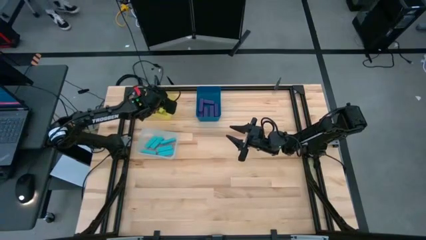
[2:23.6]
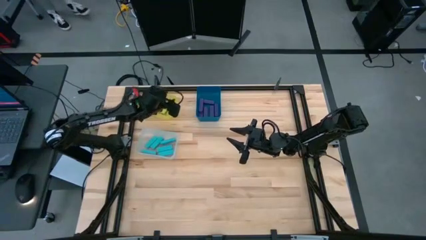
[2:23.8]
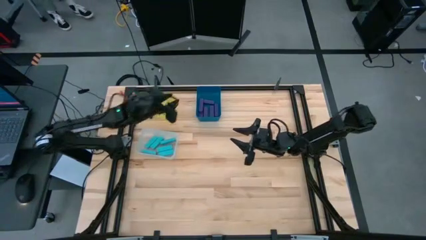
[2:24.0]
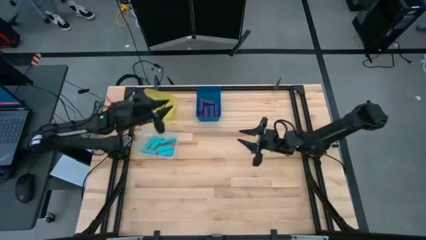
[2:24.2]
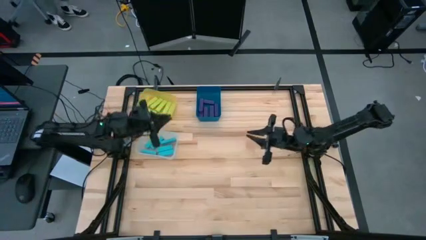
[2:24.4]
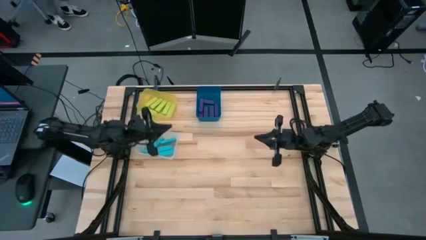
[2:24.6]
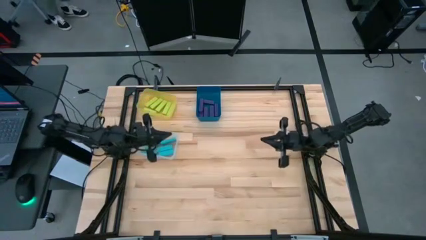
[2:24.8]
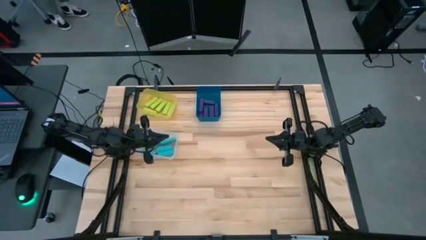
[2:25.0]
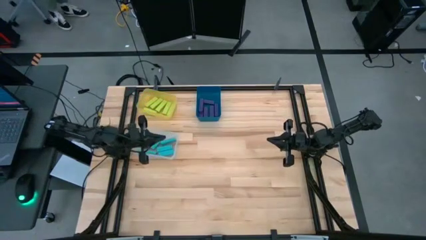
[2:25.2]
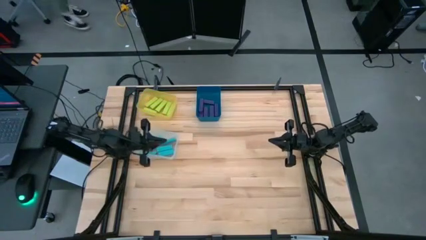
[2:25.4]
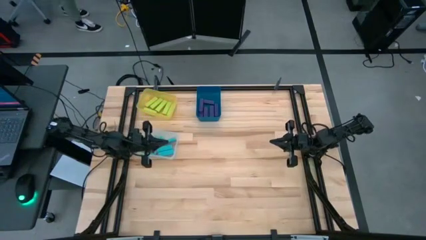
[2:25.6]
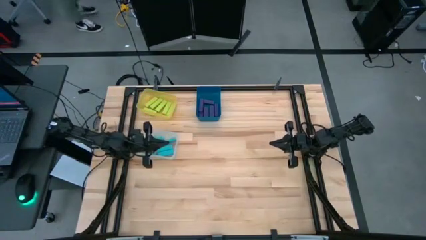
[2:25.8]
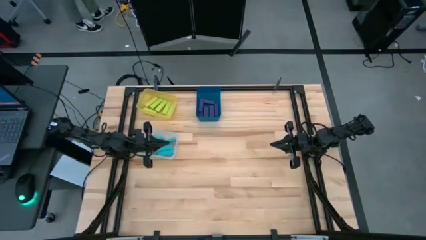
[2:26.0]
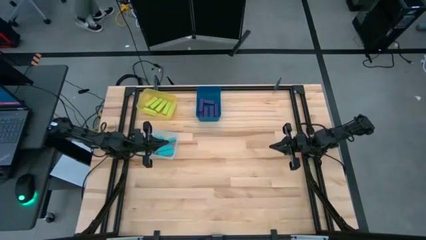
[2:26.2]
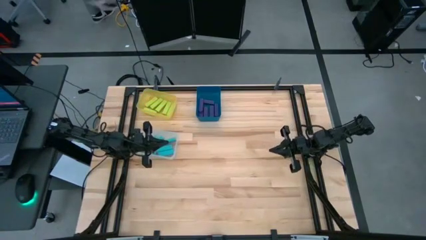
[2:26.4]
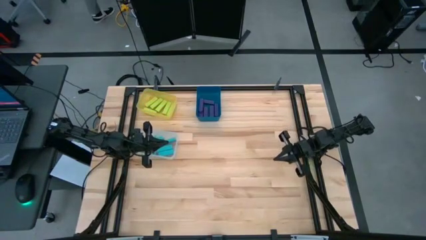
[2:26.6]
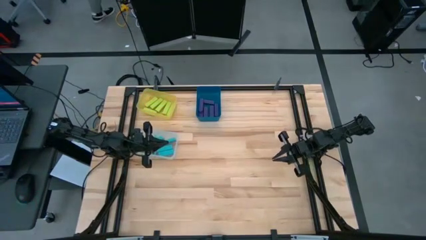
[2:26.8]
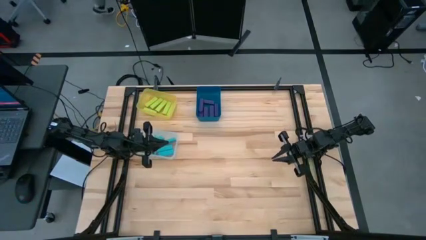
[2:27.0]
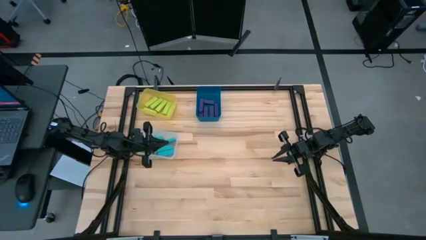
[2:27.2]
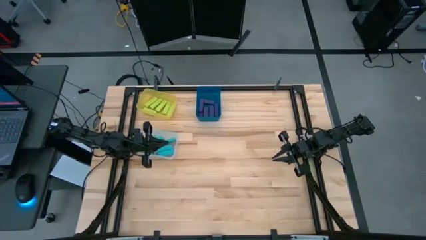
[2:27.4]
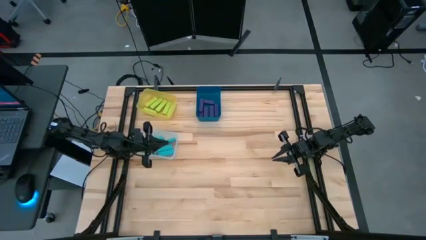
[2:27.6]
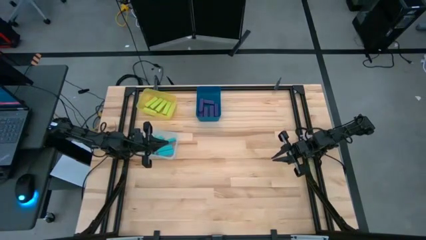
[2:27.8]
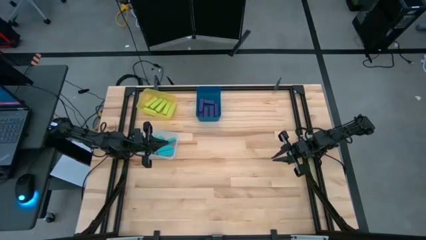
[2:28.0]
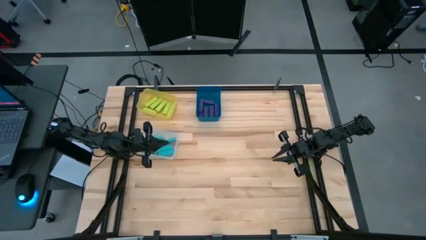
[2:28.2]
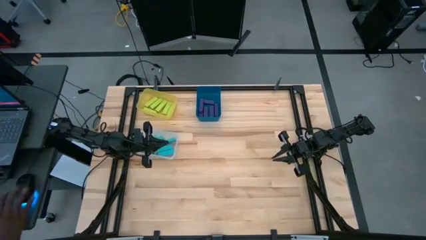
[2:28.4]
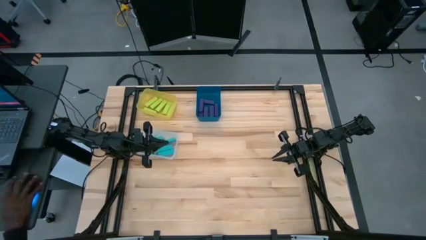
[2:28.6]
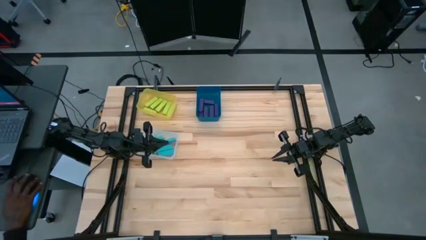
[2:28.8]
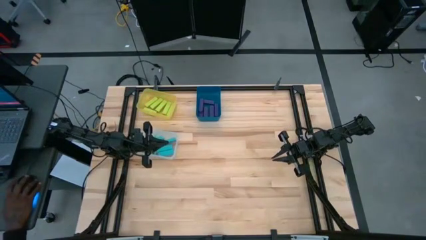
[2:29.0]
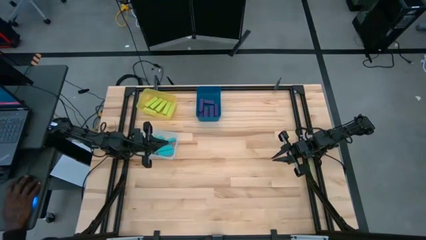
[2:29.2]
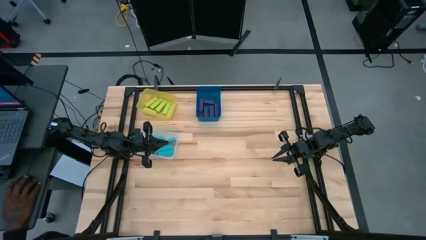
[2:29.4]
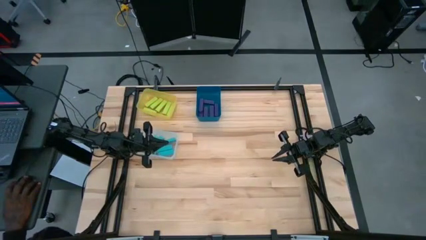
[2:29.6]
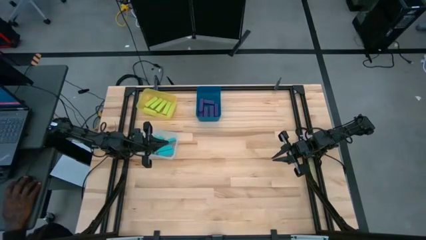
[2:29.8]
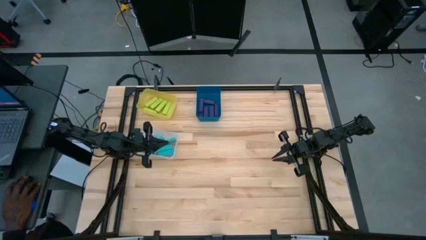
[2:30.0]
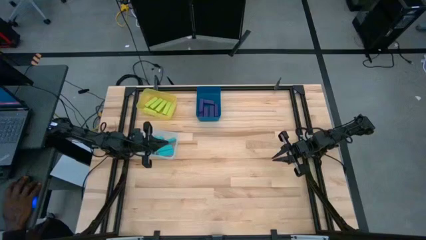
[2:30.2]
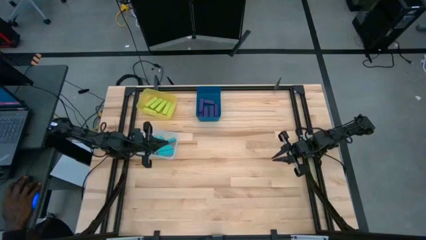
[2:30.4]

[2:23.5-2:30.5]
Task: Sort blocks
Return to Home Position

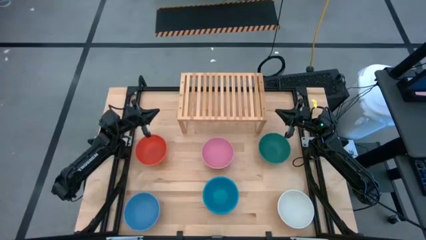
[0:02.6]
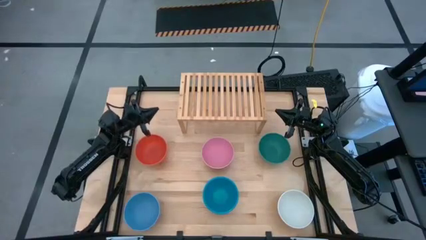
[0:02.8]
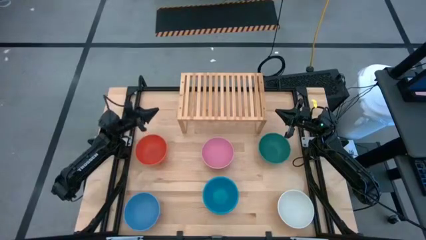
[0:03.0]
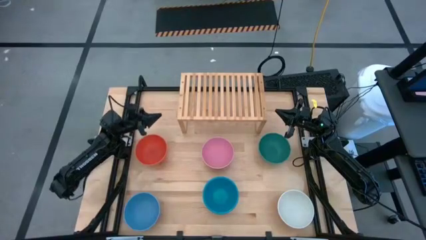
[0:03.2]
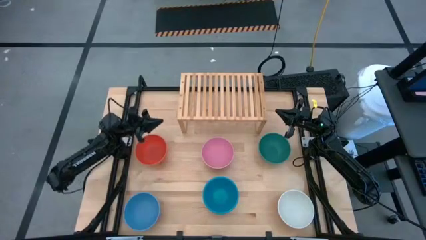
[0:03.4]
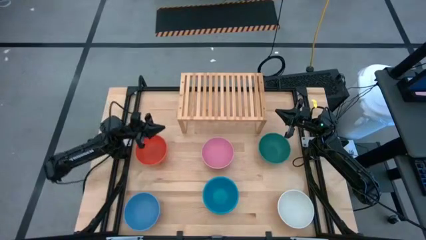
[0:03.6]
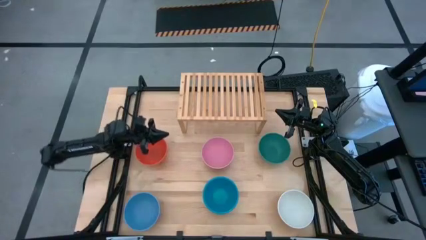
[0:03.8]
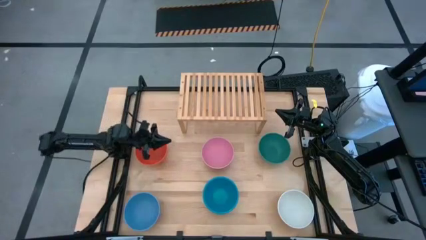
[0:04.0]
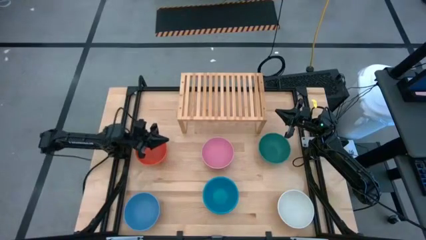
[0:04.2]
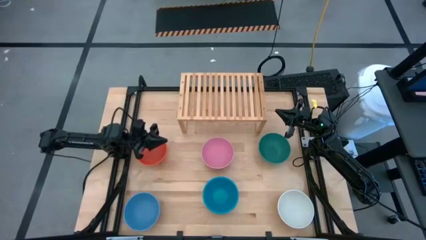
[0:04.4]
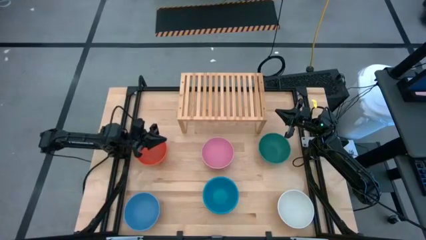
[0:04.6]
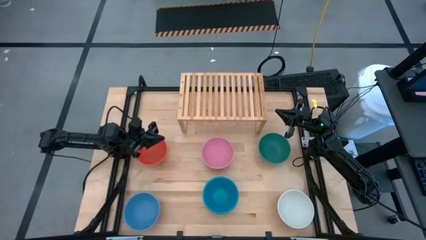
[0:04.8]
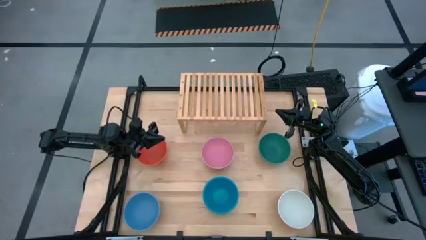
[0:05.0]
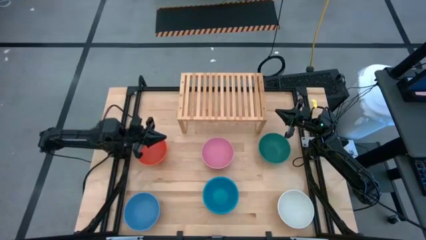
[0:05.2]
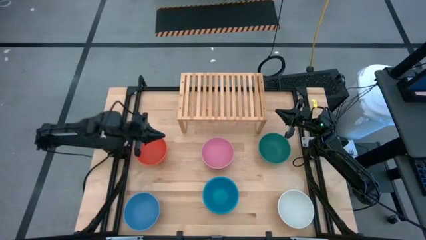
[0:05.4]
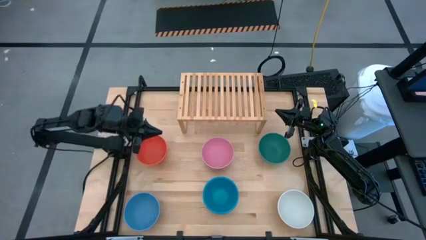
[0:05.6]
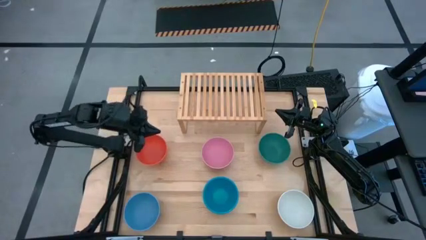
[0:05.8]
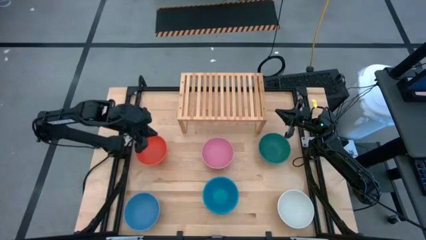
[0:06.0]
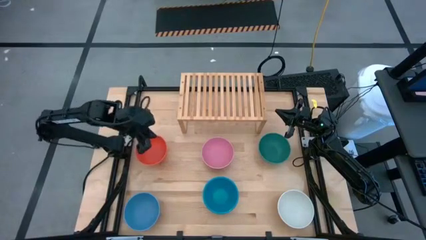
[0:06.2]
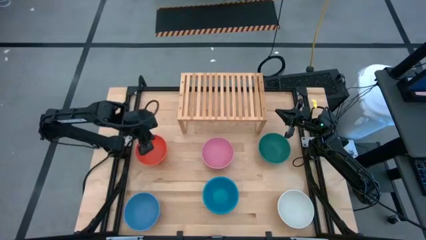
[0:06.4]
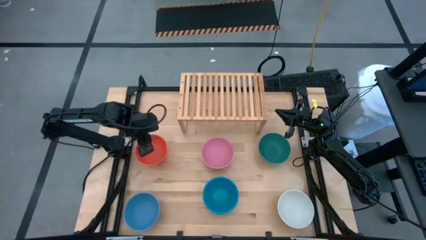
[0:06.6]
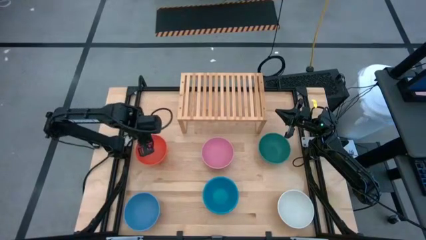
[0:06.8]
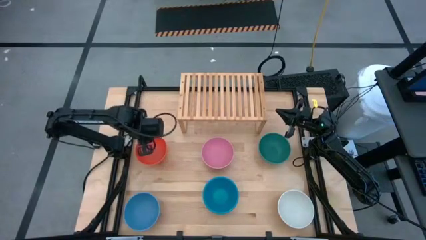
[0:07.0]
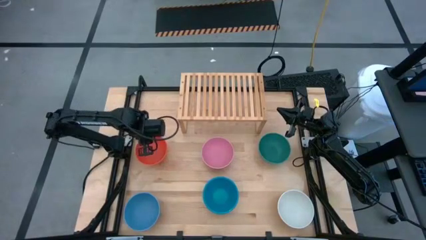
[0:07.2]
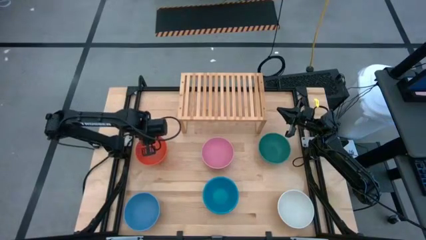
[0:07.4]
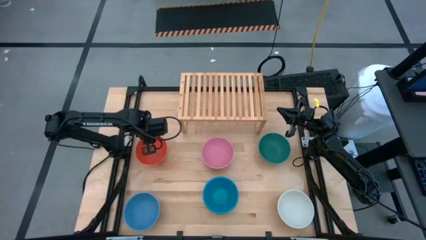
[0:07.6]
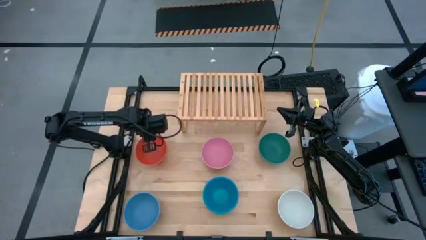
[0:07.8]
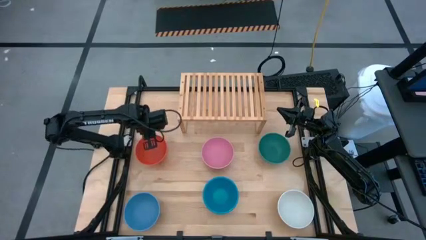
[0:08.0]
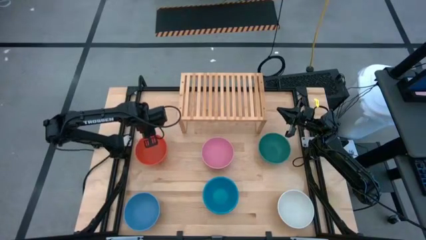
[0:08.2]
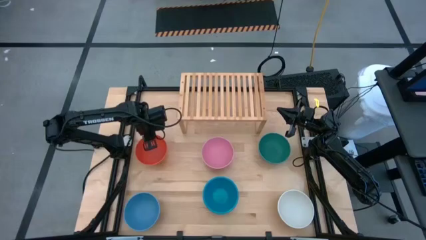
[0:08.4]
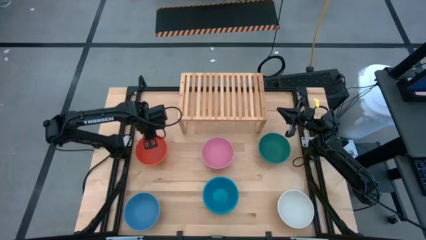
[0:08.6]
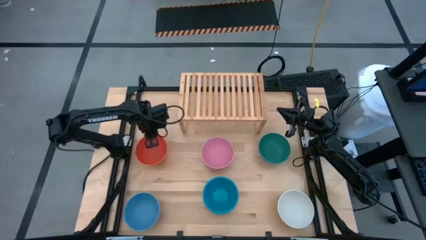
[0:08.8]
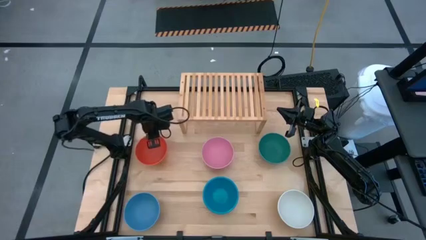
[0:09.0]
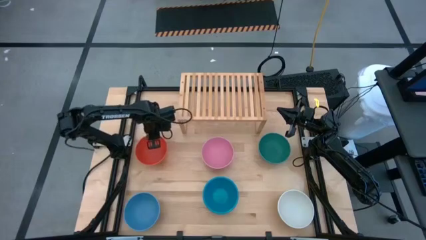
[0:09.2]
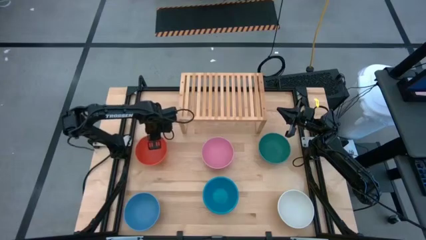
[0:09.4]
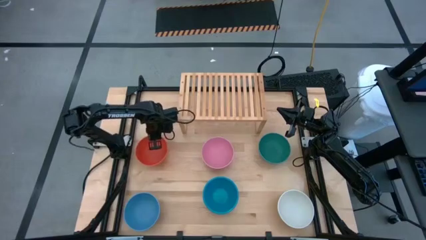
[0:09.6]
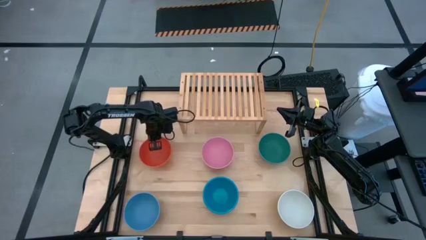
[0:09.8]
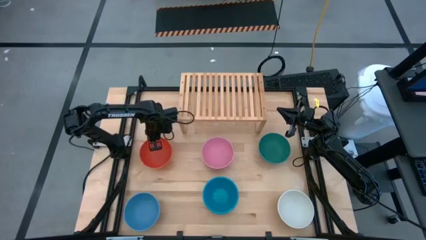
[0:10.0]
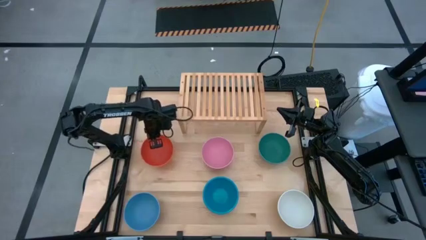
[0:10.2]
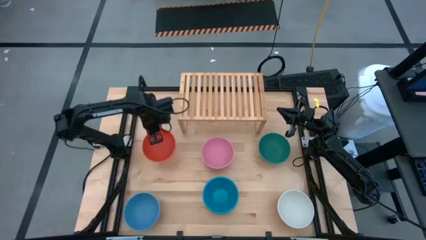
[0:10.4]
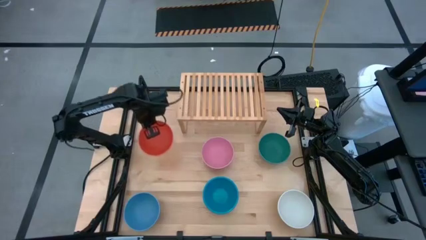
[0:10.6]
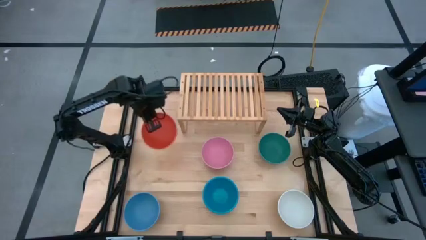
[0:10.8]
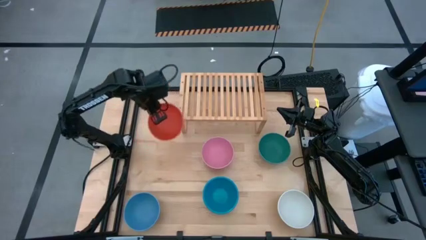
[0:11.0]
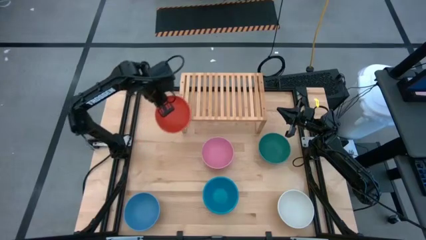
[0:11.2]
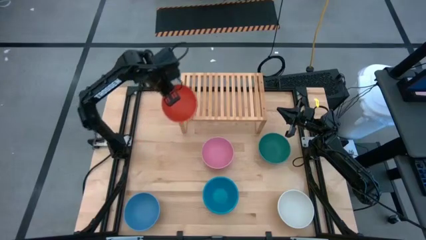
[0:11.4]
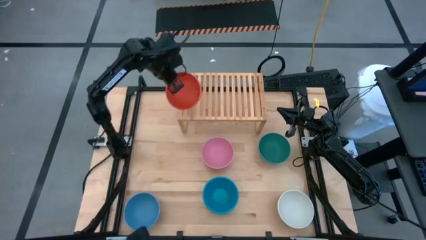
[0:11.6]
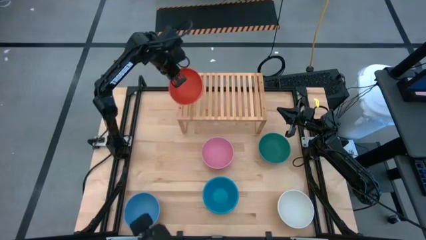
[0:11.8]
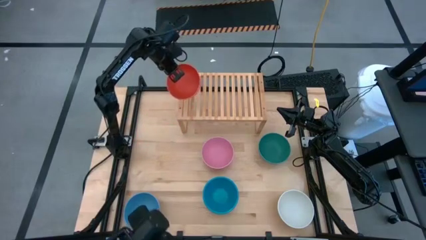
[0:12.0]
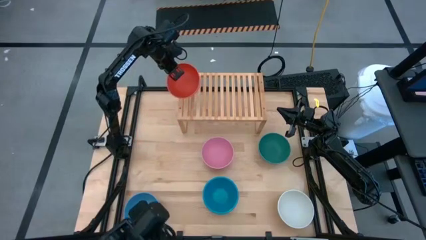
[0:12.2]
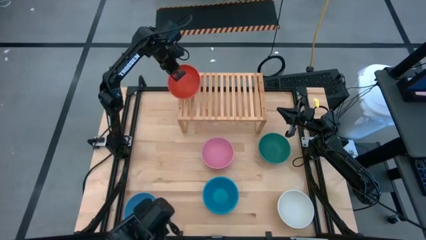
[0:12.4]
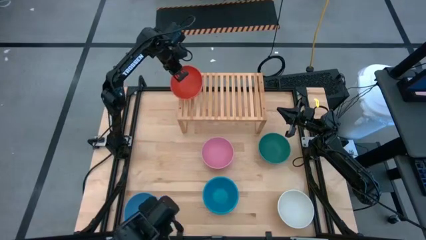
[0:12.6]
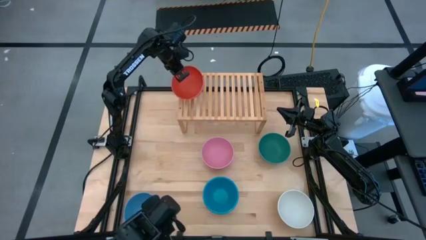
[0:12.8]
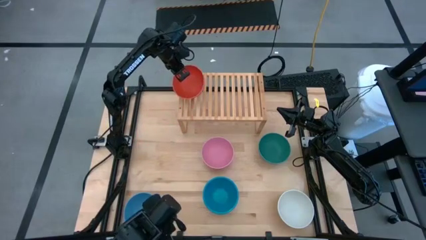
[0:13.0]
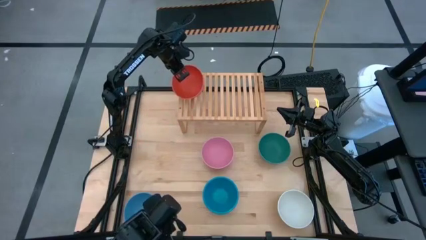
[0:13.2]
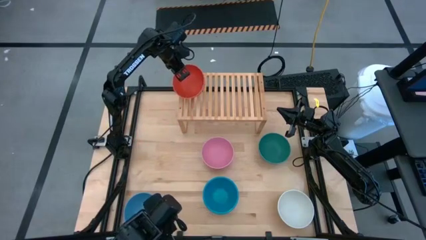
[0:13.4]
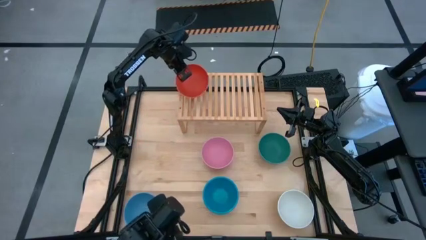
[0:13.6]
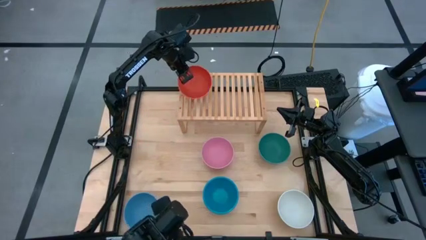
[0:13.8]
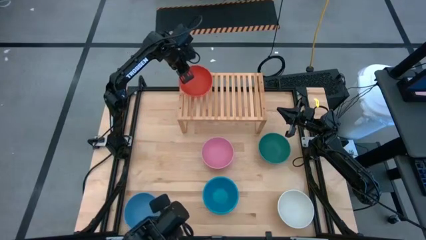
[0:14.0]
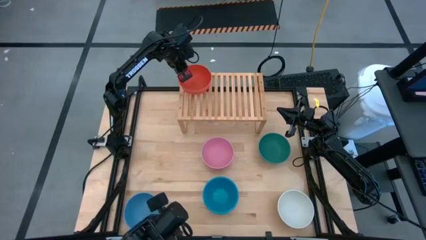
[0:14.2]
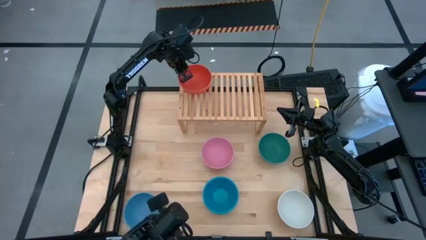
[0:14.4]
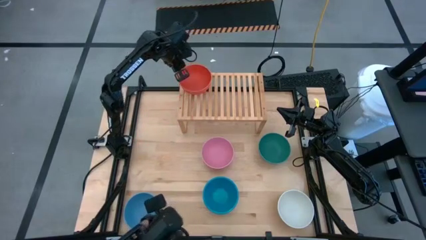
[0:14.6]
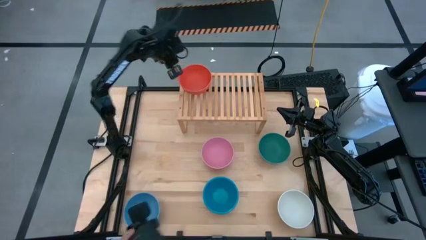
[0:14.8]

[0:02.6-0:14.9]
Task: Place and stack bowls onto a shelf
Put the orange bowl on the shelf
